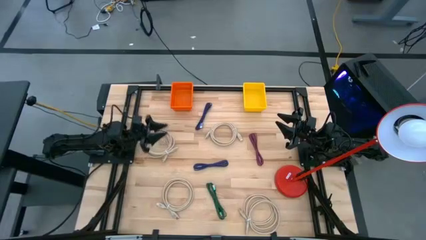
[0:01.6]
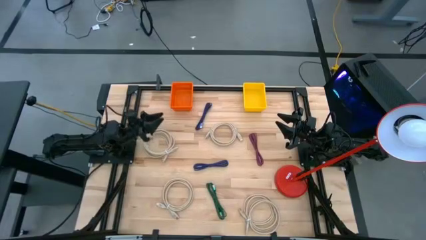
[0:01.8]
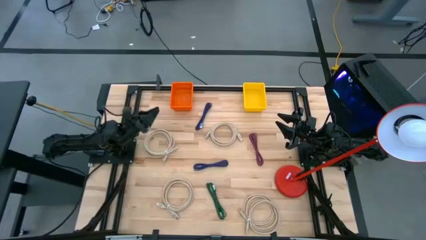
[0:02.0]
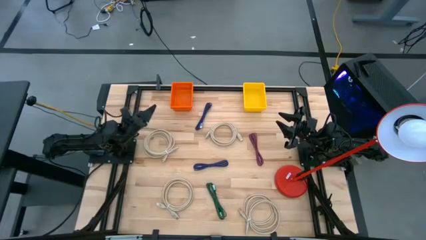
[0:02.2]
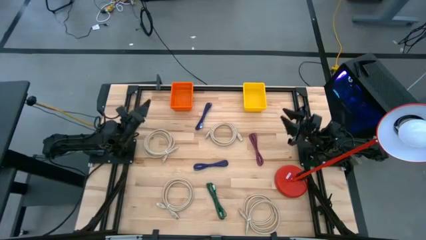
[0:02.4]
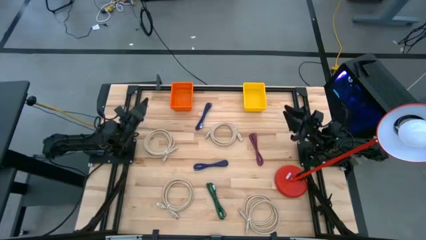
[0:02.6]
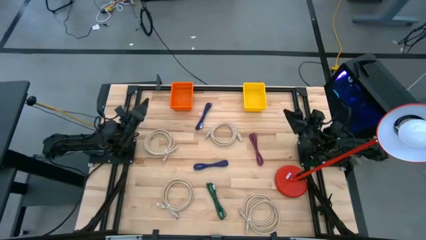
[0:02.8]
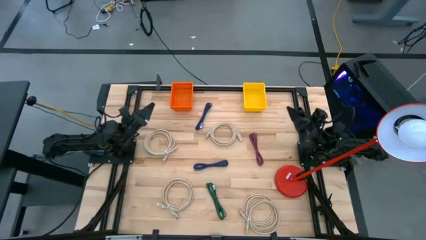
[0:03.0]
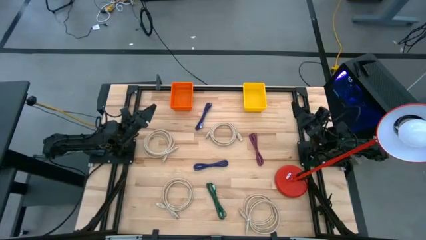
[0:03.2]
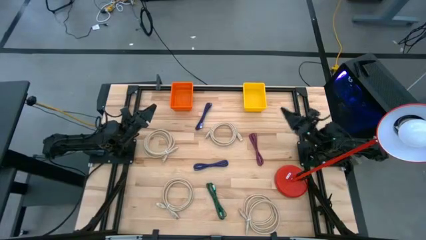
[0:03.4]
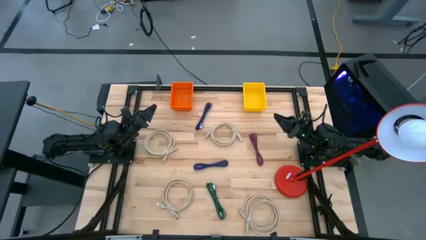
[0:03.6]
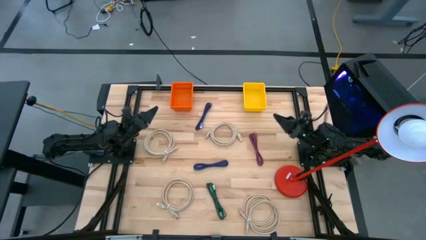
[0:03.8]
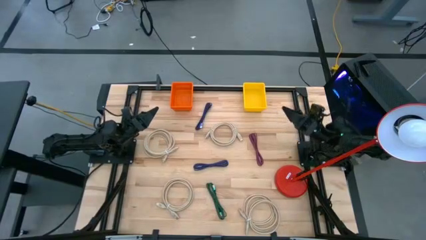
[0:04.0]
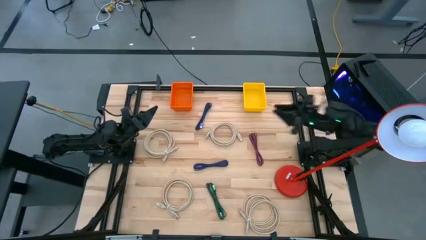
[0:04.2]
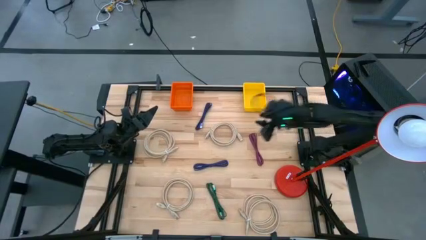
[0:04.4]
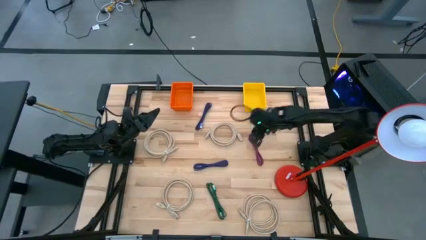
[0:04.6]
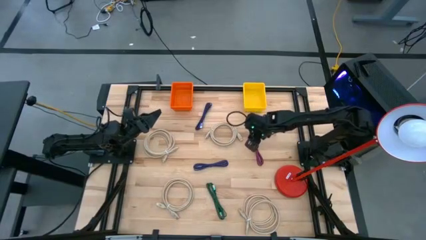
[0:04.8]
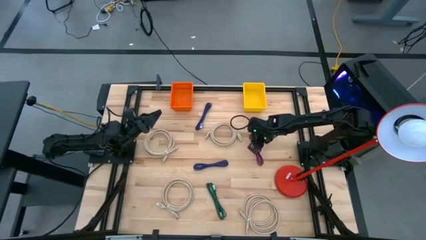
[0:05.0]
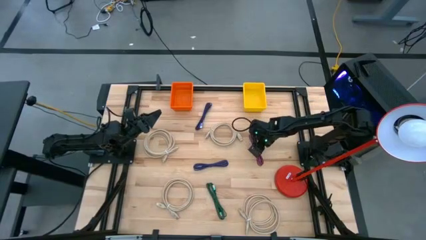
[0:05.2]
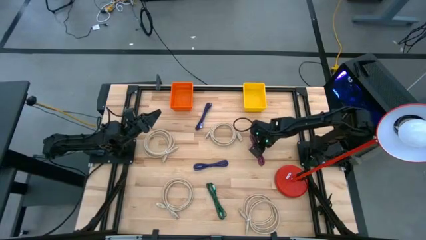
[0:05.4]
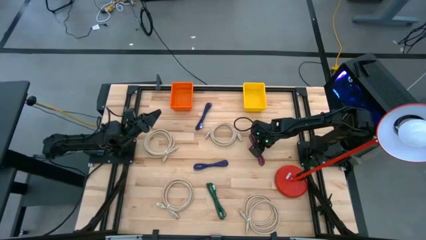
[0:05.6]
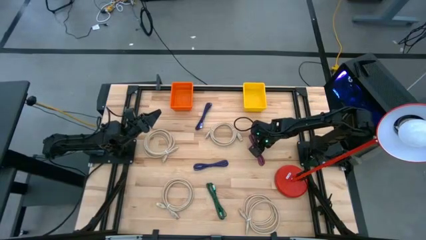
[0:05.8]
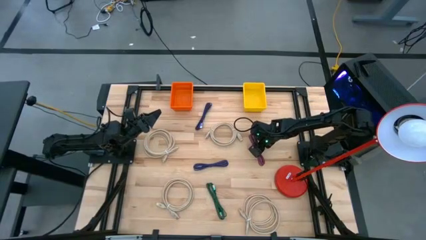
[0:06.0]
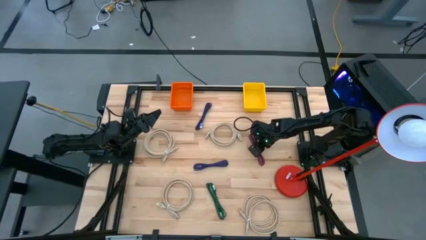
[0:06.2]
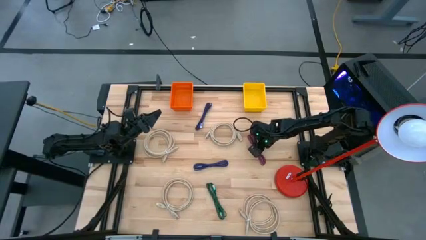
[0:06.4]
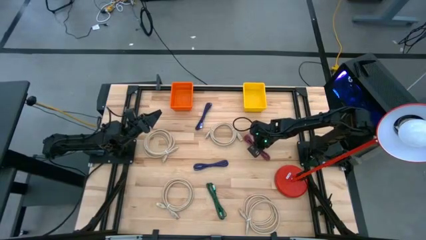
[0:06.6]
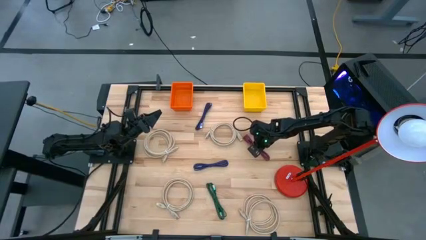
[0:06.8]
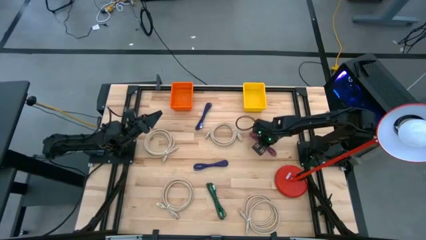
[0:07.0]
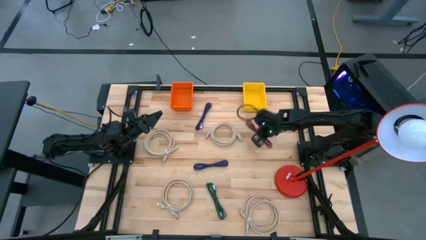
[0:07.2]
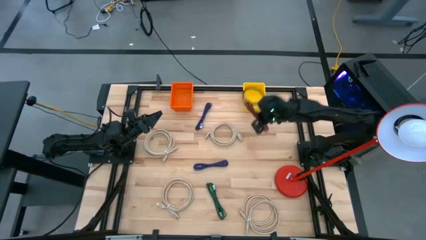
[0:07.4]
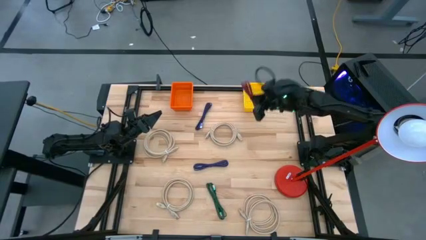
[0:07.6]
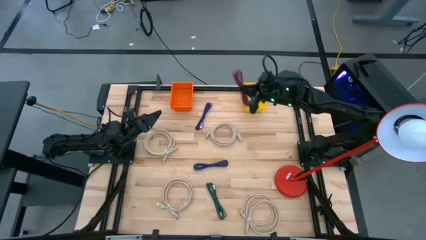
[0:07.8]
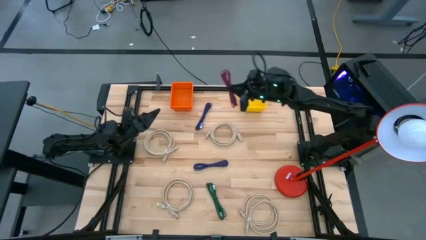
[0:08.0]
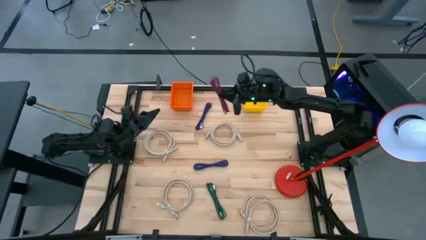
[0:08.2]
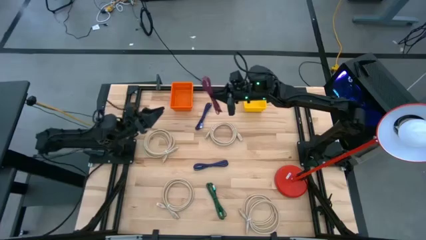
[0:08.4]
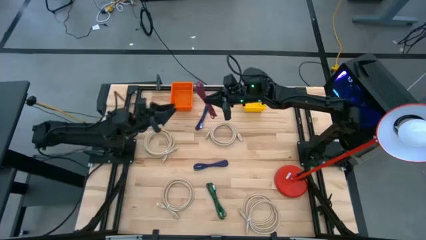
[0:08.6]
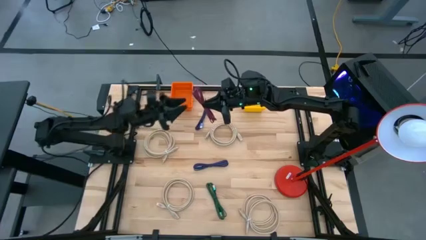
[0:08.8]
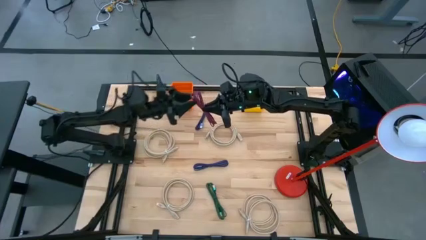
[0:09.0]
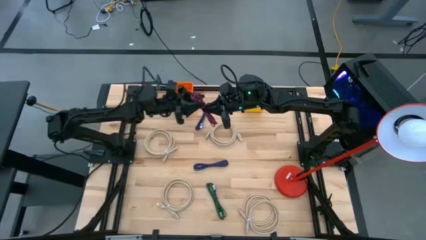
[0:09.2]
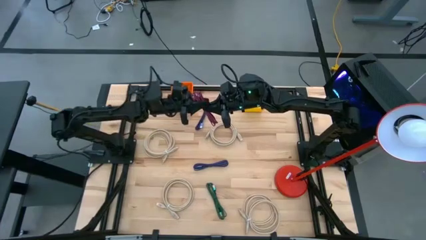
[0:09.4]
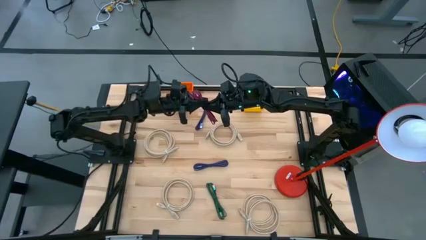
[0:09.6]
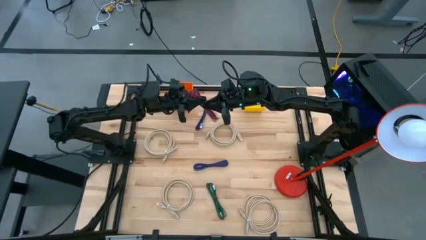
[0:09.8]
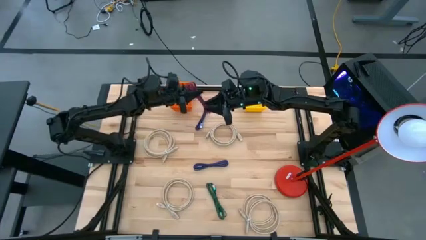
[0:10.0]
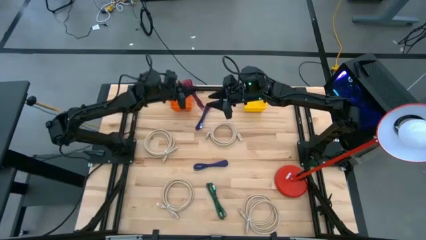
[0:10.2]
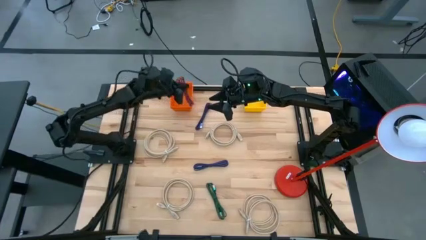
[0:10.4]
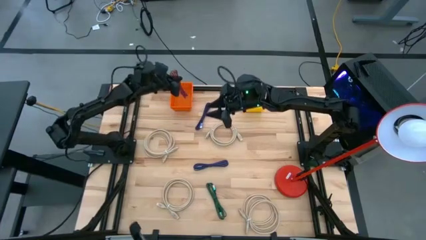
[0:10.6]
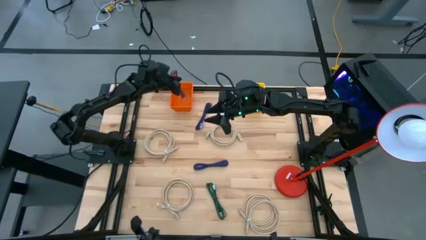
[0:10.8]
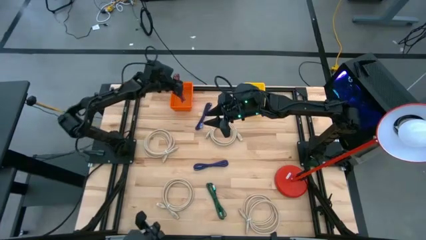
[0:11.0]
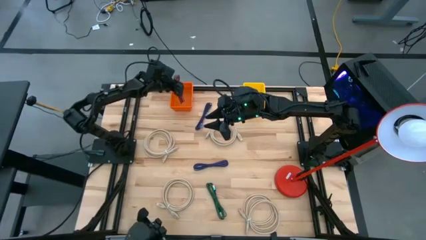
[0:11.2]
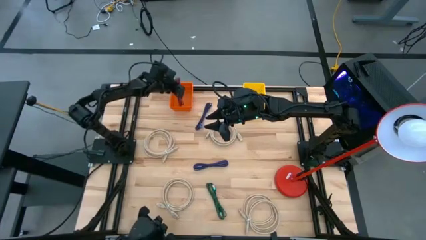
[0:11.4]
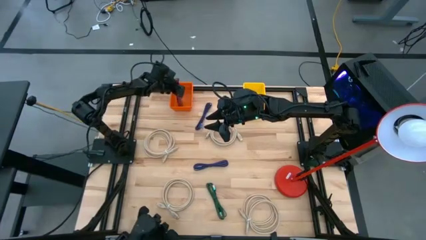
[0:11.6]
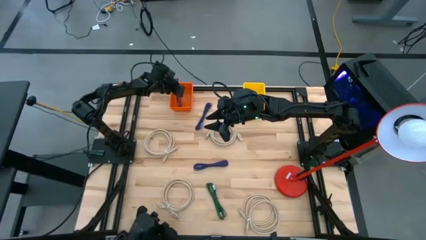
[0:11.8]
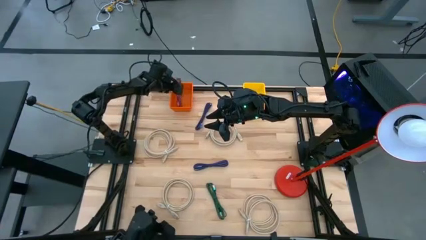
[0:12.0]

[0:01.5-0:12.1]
Task: Pick & Place USB Port
Put the pink patterned charger cable into the orange bin

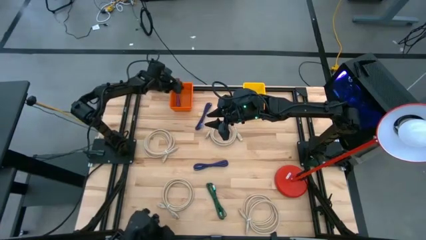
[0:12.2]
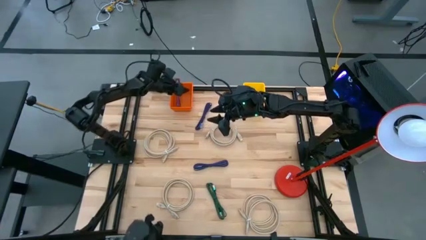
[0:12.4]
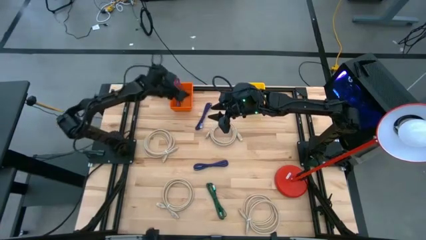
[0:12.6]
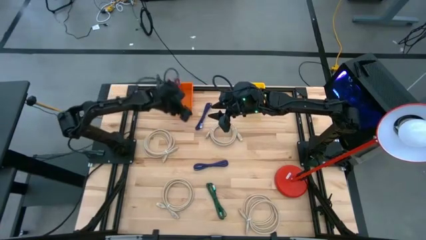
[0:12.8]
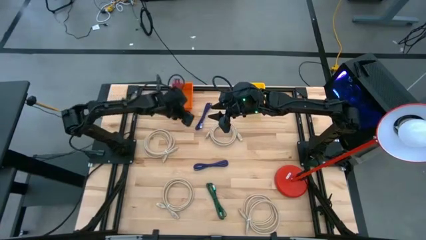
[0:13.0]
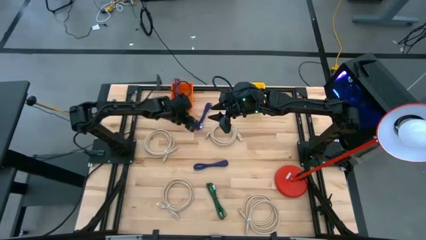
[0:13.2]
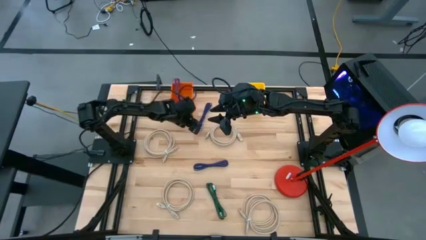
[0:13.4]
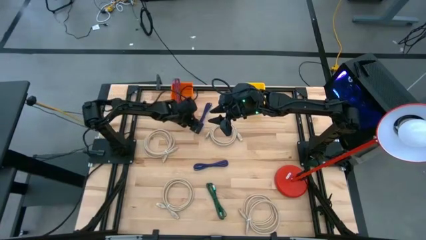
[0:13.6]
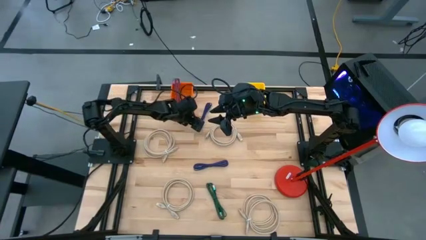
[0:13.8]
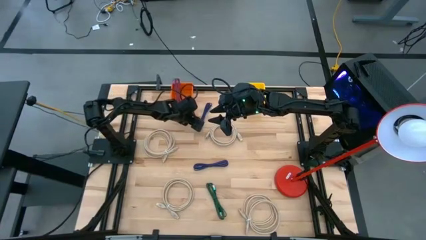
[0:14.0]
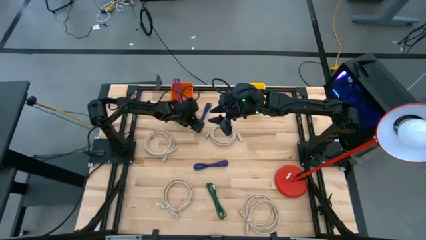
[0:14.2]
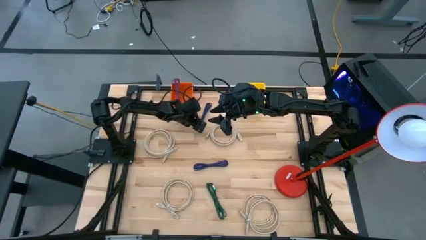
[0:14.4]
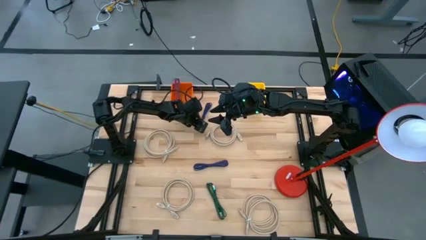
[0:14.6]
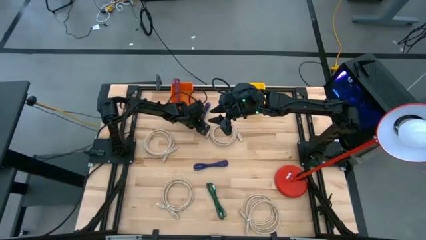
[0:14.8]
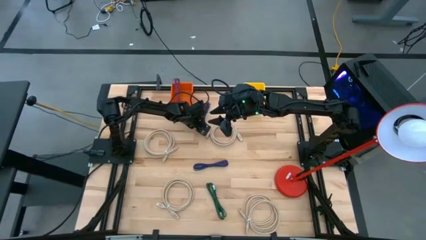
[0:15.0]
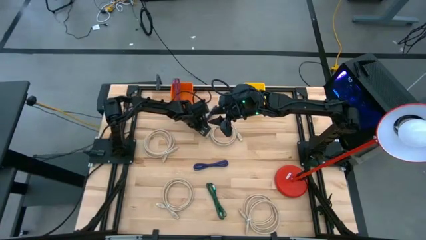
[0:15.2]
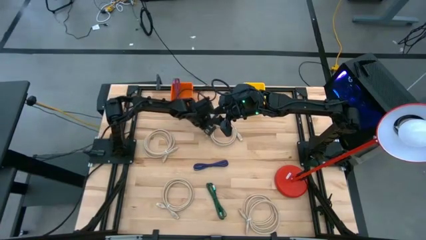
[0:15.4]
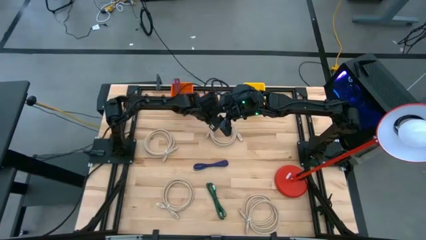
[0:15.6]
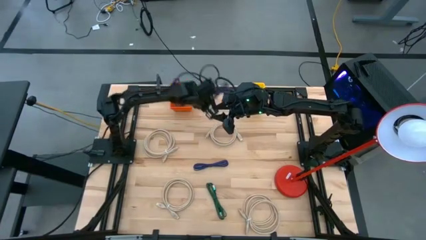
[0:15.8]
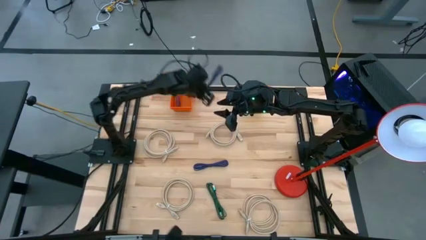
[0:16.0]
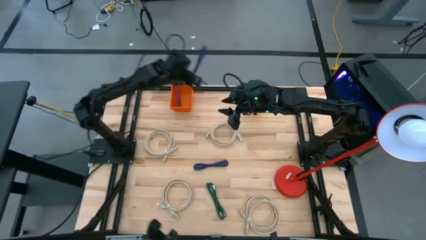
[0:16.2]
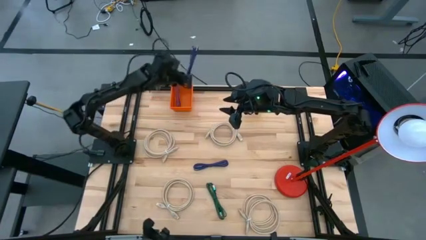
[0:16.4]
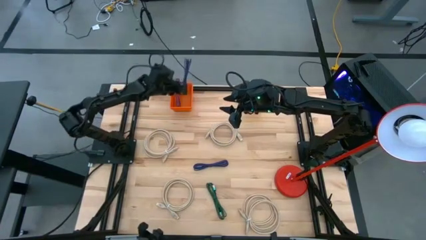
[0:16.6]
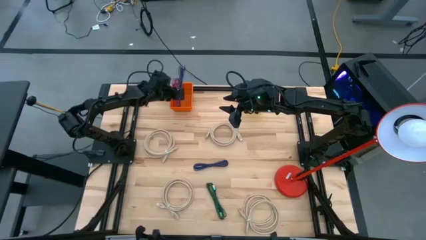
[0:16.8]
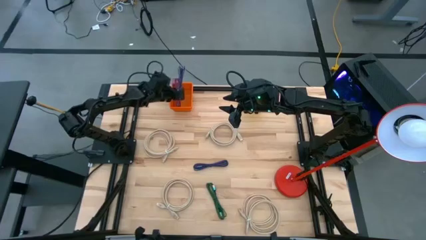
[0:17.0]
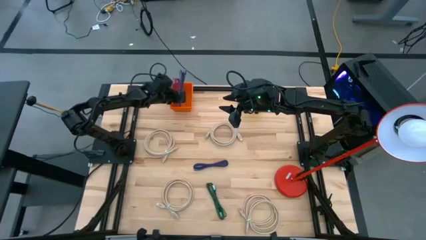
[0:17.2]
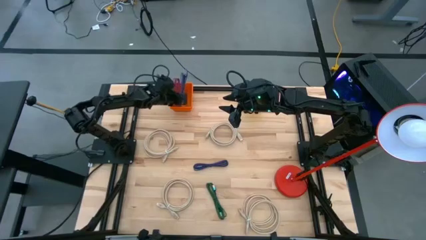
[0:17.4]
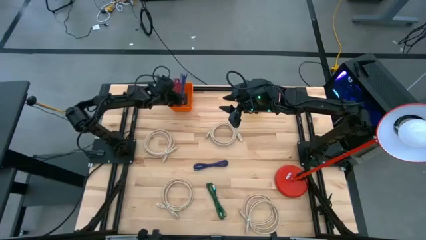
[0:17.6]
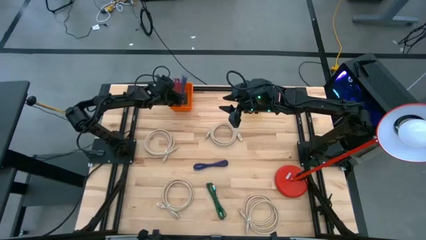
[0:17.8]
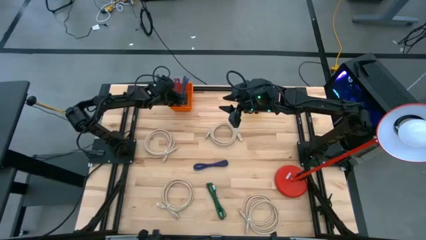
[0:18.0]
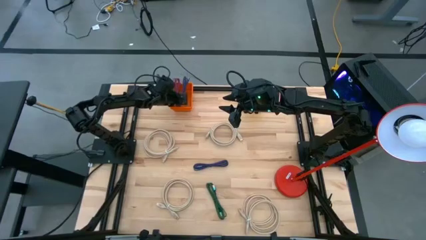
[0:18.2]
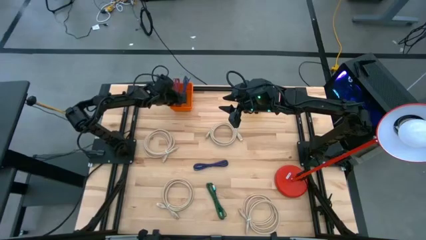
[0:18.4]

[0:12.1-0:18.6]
Put the blue patterned charger cable into the orange bin
